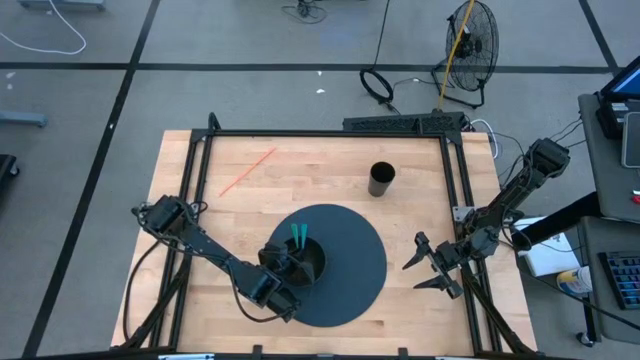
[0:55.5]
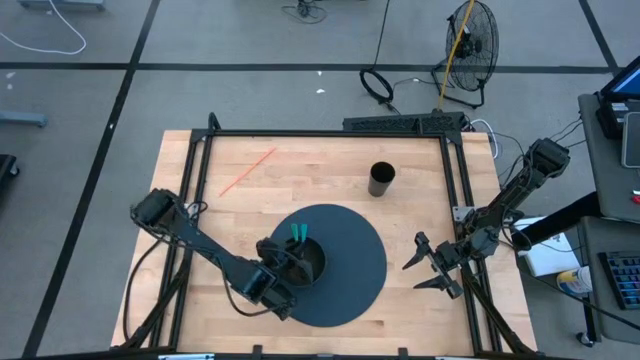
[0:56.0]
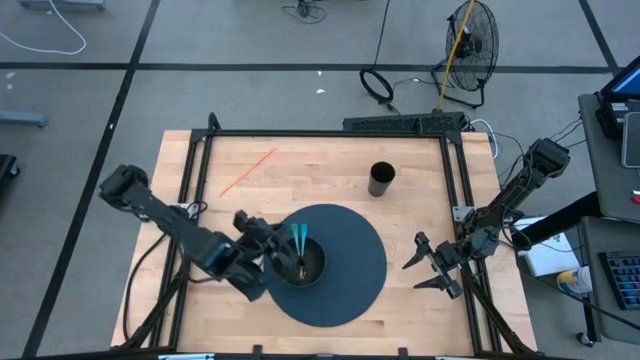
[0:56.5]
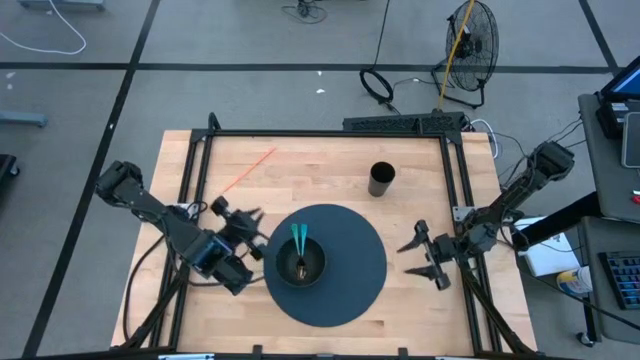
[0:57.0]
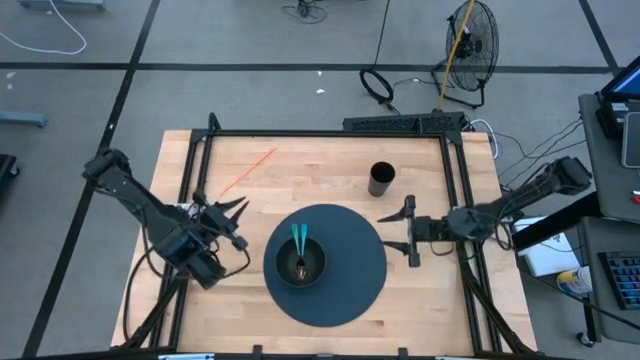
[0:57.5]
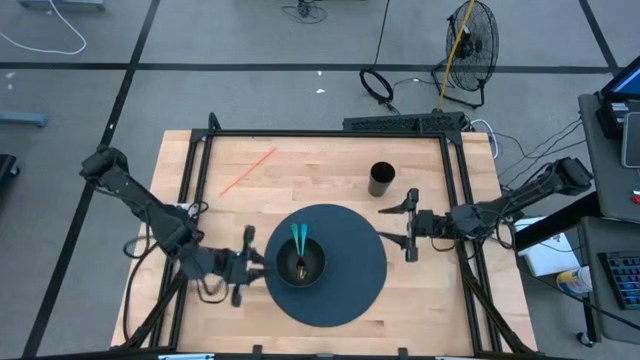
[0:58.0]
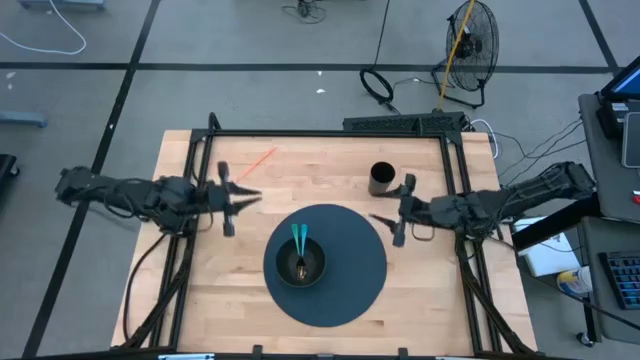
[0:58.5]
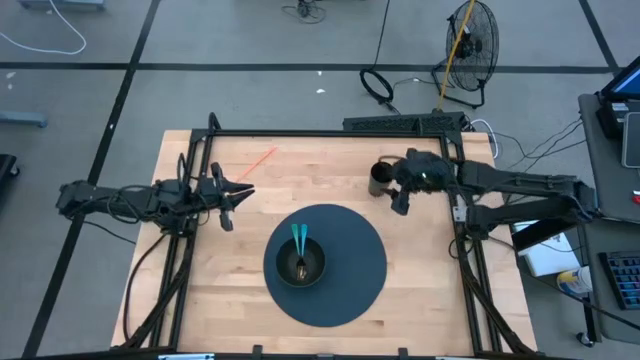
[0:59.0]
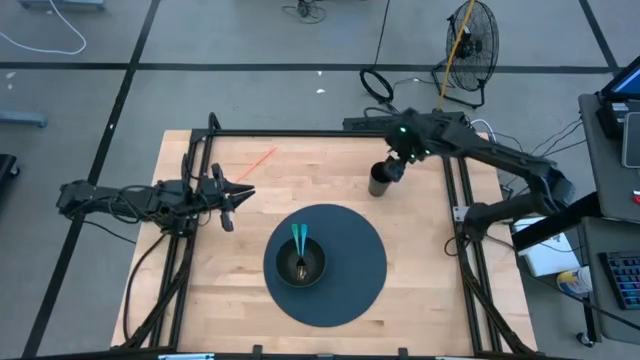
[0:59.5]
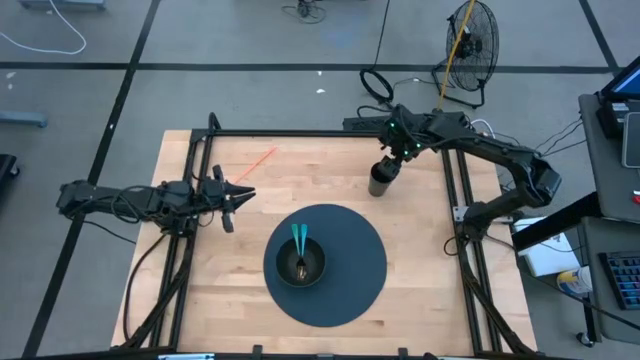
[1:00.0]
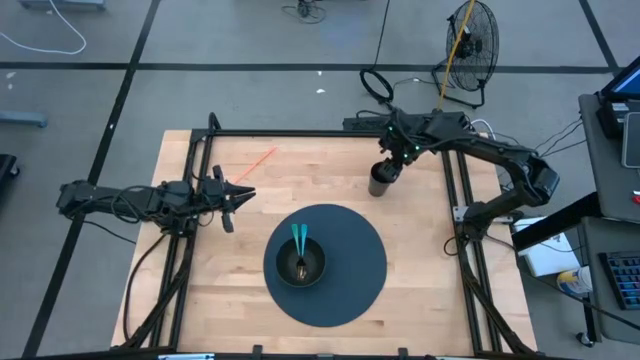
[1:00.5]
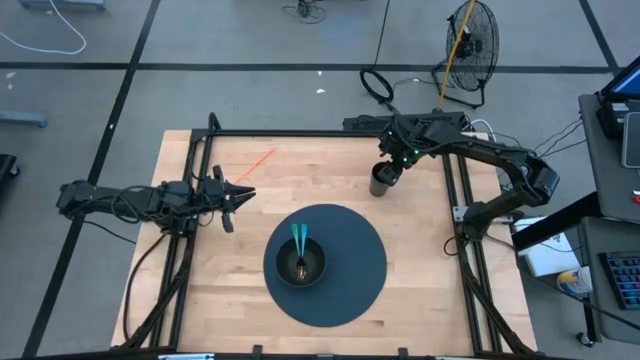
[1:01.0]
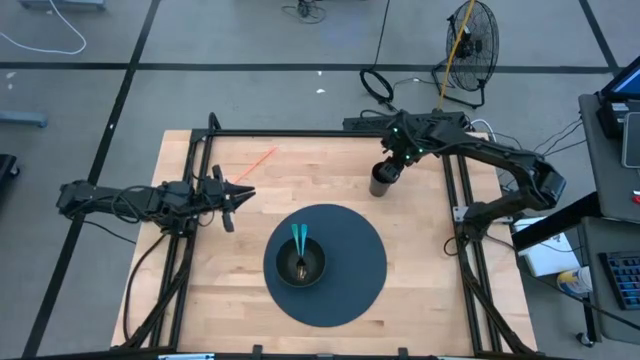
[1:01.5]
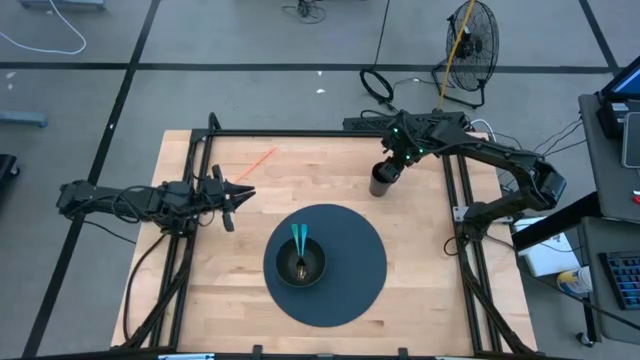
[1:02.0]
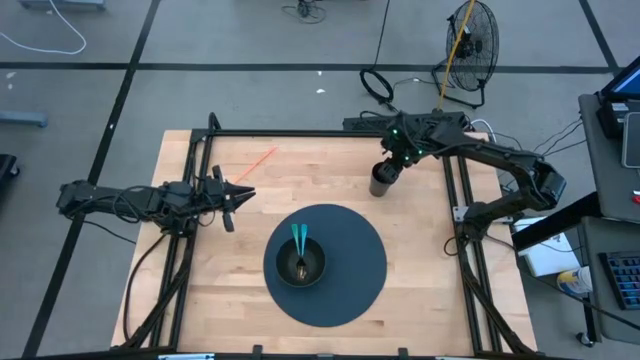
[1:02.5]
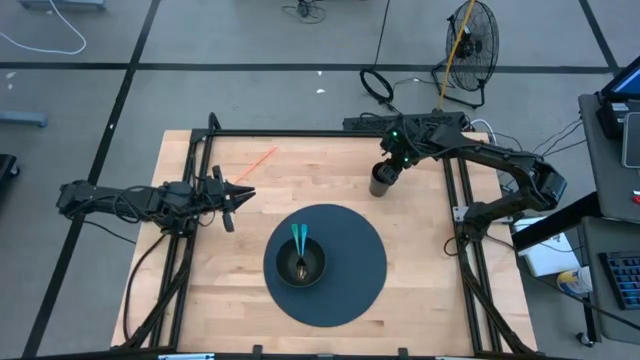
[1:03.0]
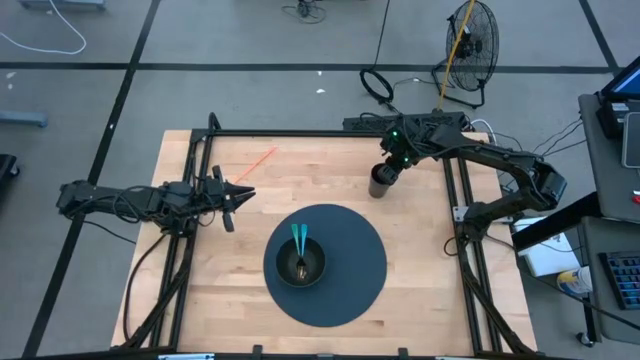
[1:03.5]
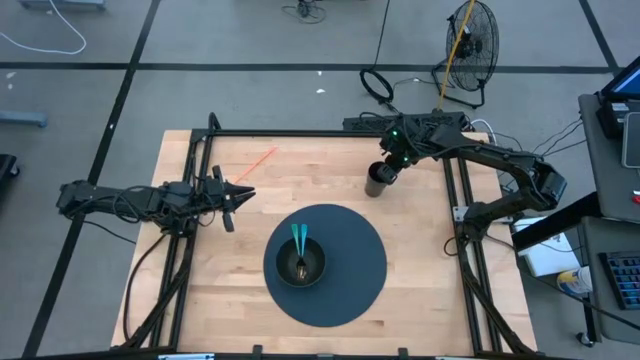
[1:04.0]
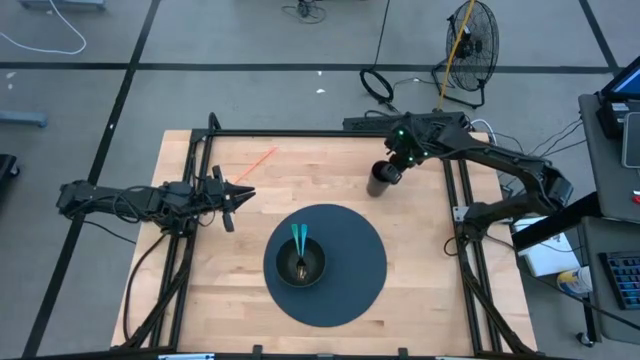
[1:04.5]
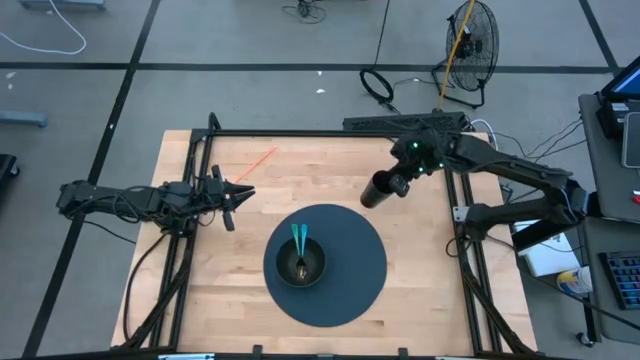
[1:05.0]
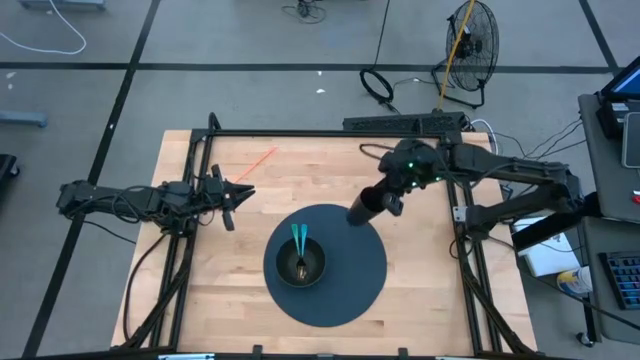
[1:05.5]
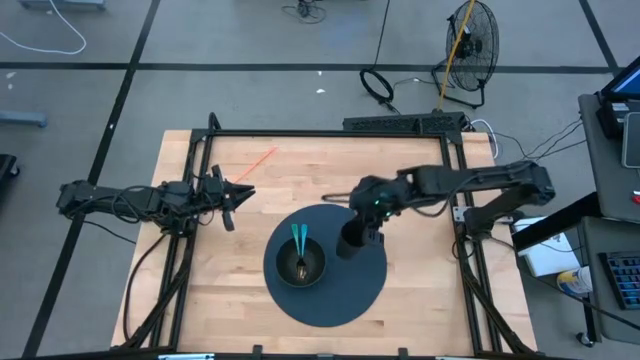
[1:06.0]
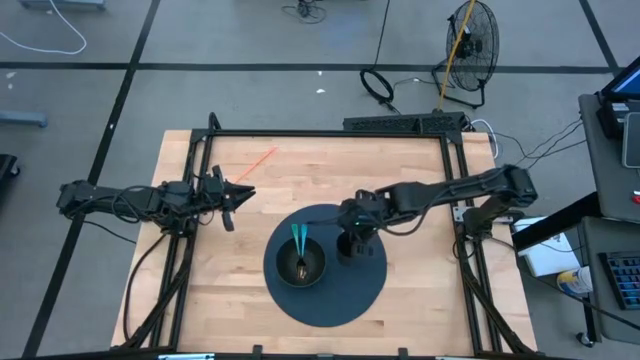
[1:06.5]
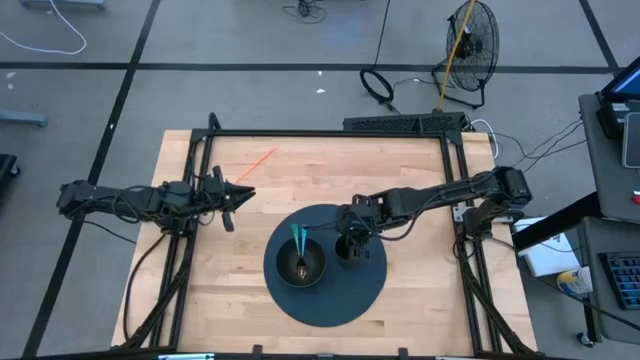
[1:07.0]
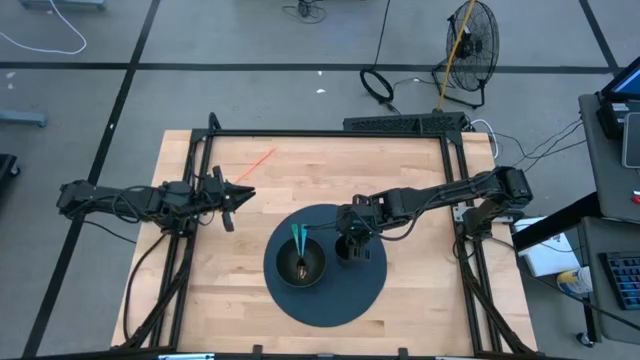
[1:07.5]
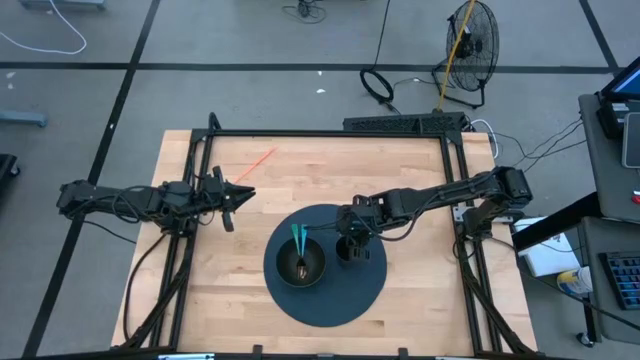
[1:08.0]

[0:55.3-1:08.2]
Task: Pick & Place Utensil
Put the black cup on the blue mat to the right of the black bowl
